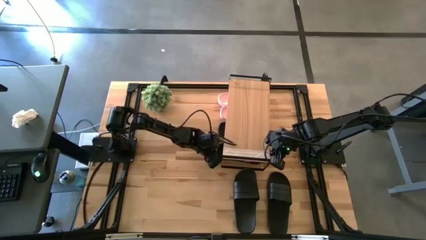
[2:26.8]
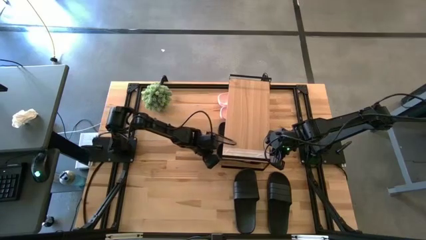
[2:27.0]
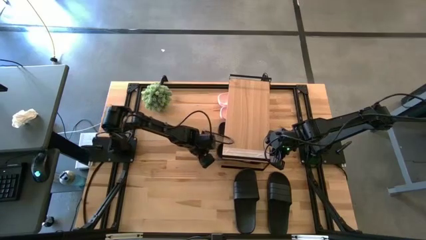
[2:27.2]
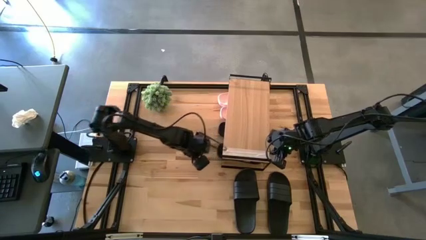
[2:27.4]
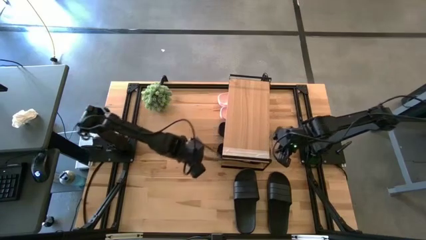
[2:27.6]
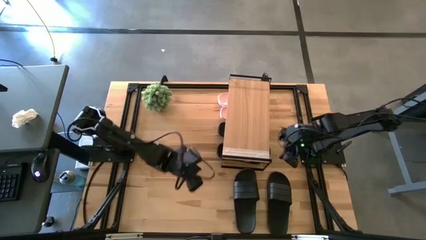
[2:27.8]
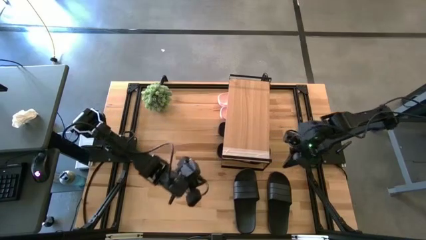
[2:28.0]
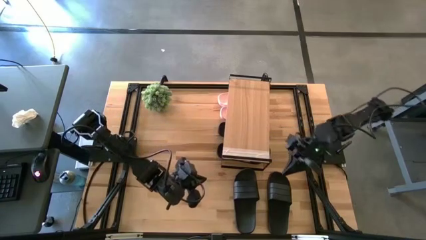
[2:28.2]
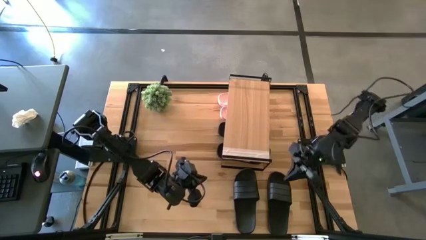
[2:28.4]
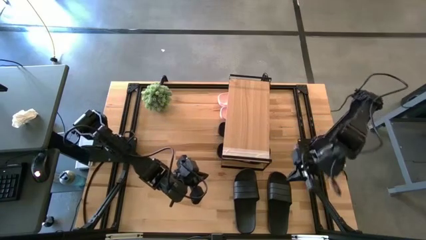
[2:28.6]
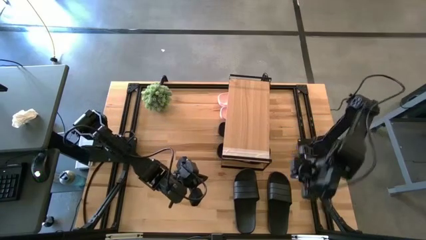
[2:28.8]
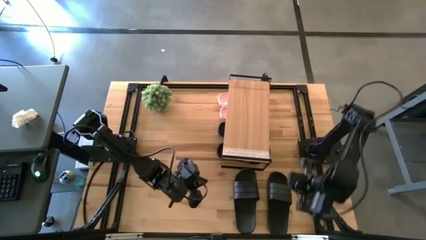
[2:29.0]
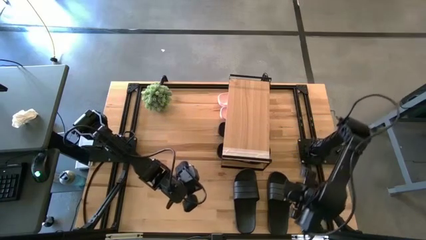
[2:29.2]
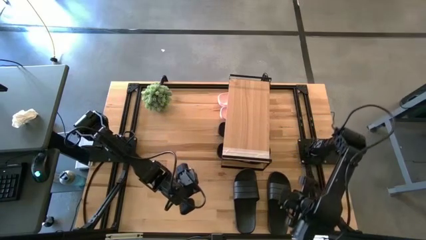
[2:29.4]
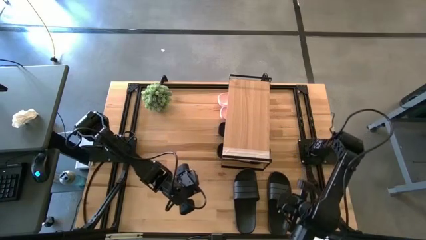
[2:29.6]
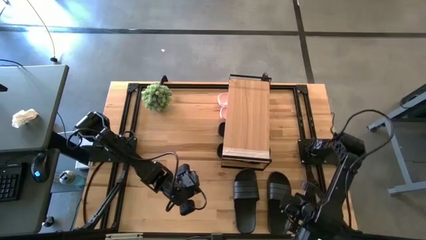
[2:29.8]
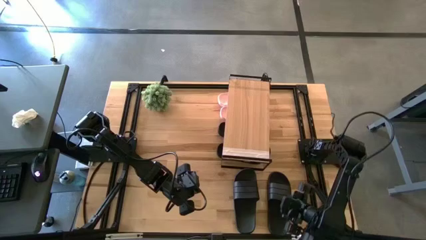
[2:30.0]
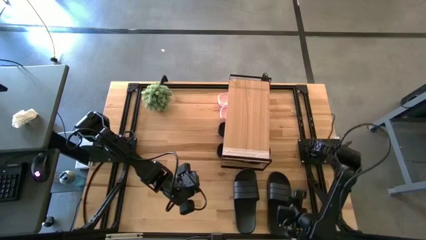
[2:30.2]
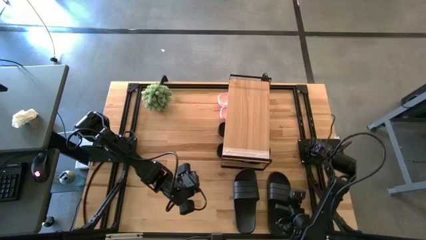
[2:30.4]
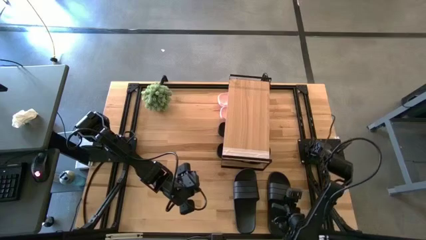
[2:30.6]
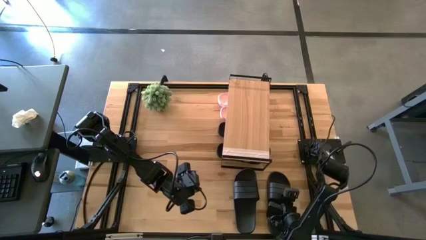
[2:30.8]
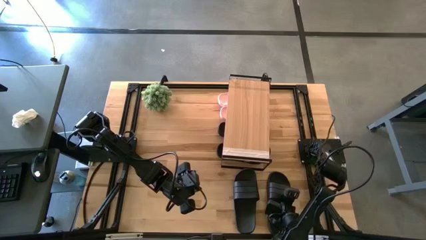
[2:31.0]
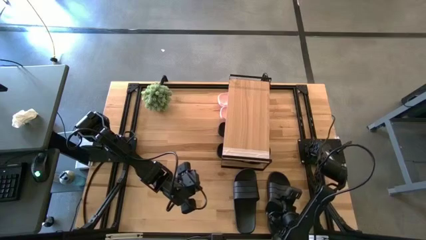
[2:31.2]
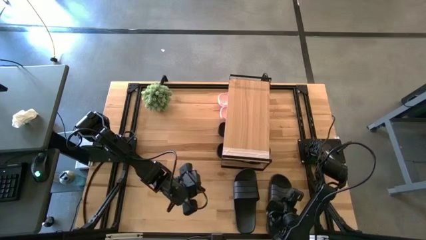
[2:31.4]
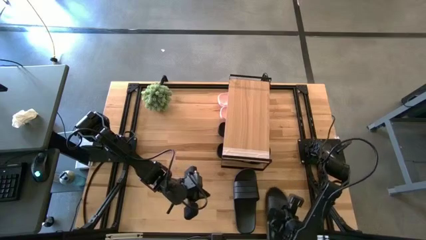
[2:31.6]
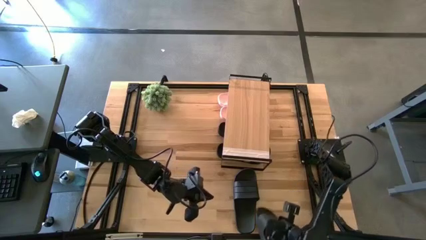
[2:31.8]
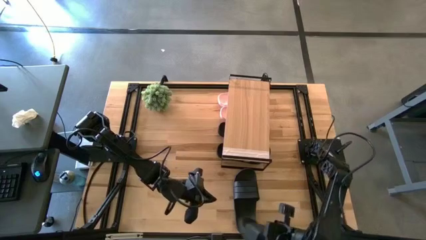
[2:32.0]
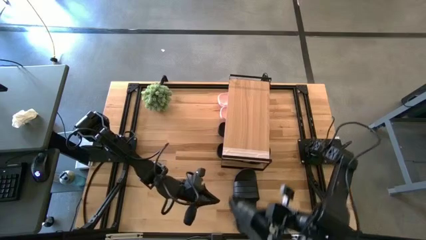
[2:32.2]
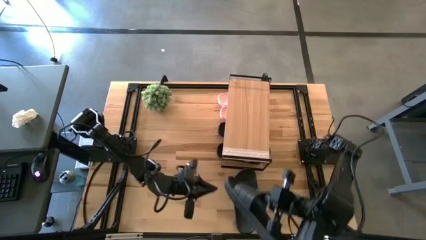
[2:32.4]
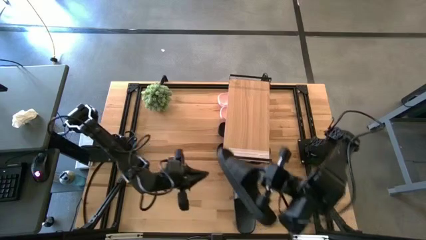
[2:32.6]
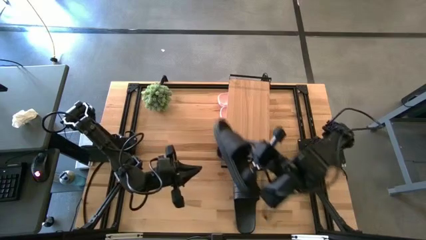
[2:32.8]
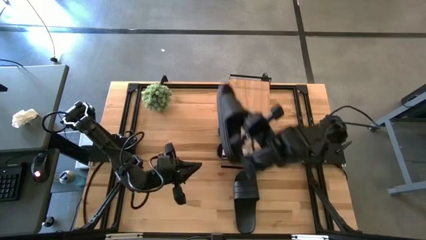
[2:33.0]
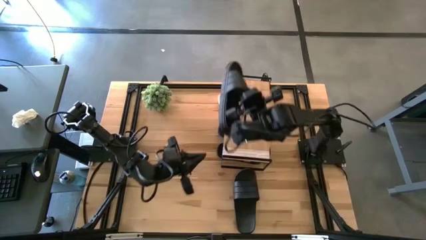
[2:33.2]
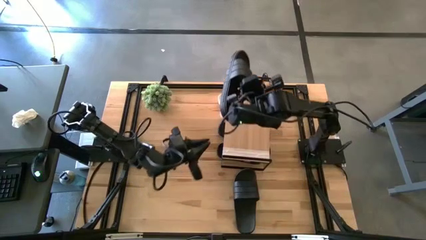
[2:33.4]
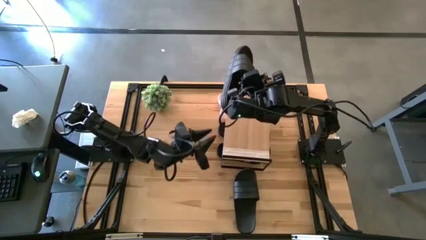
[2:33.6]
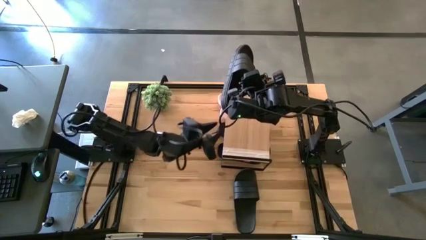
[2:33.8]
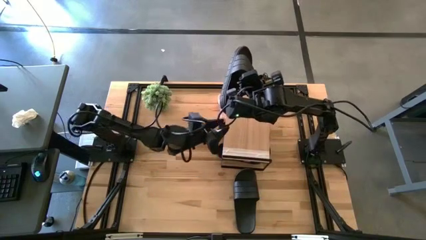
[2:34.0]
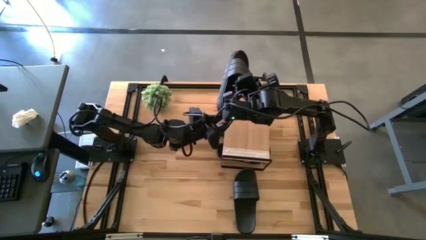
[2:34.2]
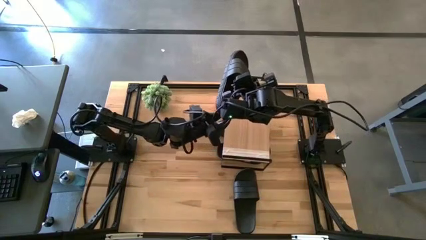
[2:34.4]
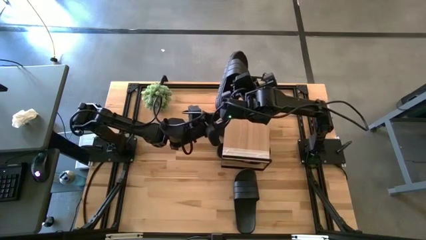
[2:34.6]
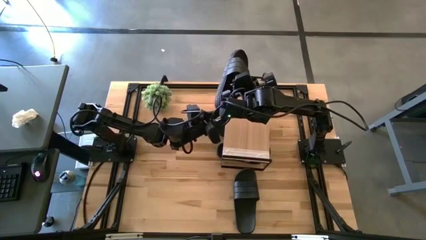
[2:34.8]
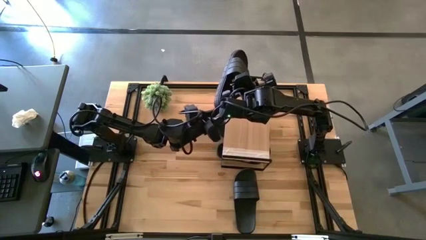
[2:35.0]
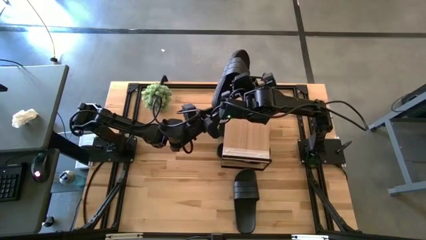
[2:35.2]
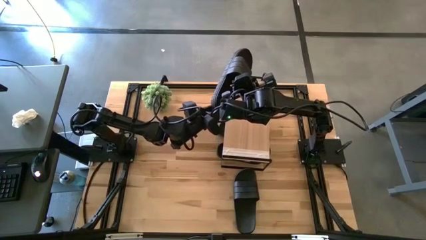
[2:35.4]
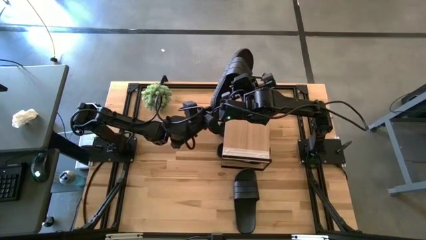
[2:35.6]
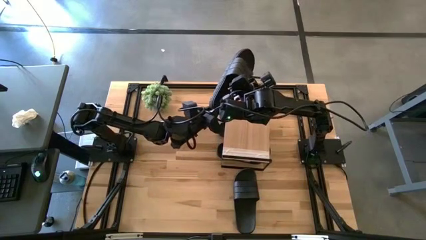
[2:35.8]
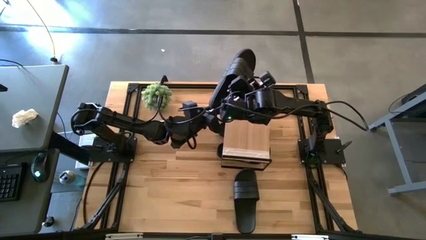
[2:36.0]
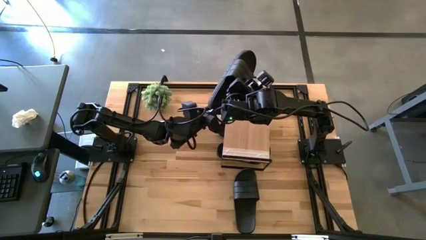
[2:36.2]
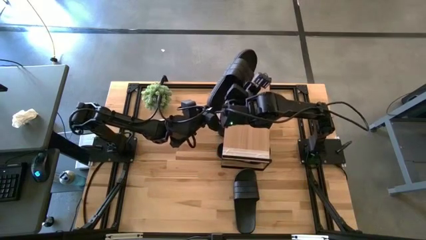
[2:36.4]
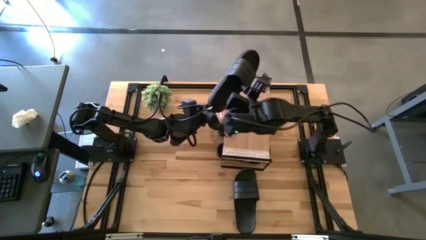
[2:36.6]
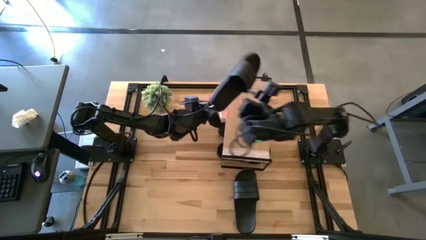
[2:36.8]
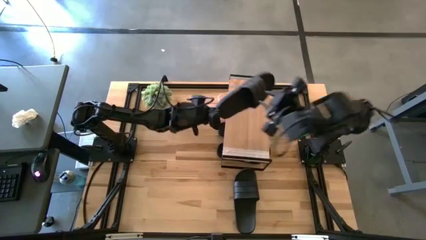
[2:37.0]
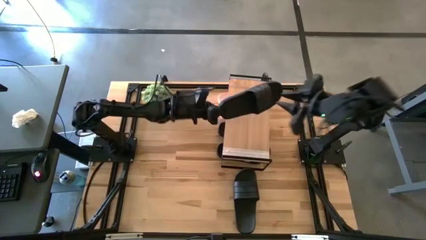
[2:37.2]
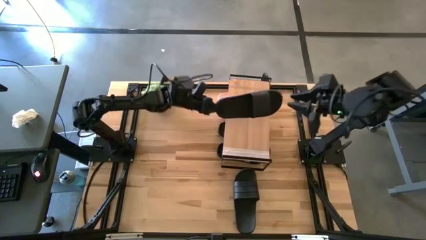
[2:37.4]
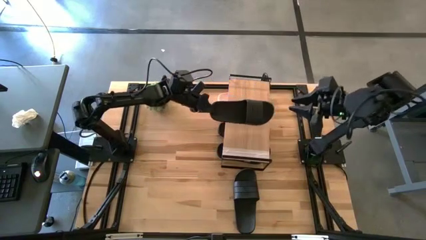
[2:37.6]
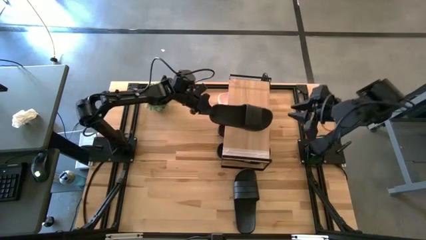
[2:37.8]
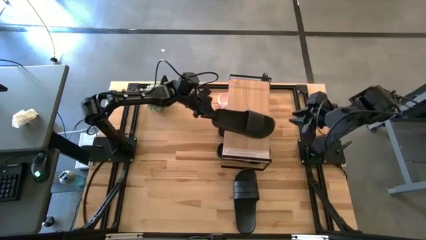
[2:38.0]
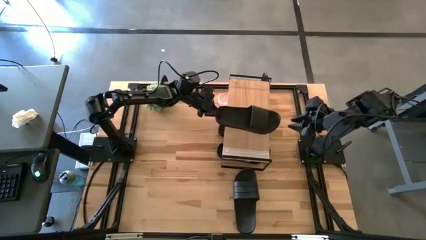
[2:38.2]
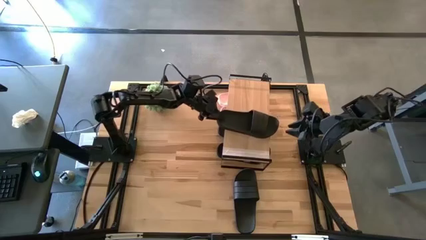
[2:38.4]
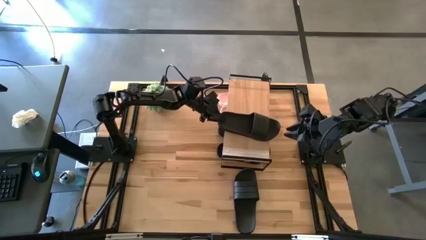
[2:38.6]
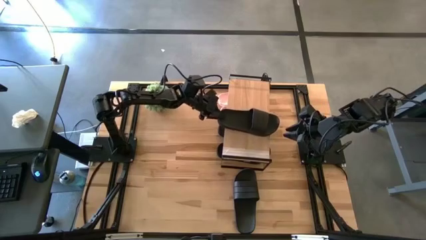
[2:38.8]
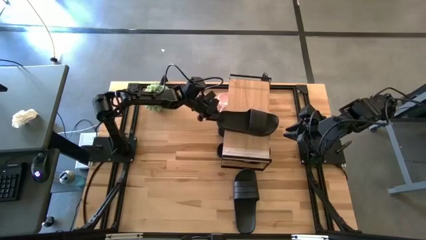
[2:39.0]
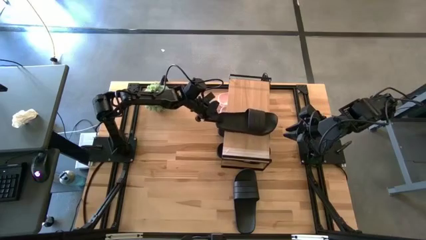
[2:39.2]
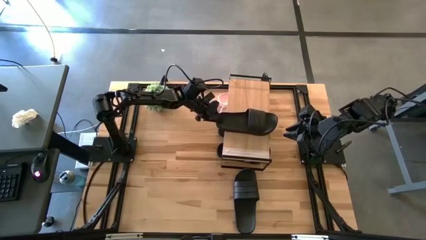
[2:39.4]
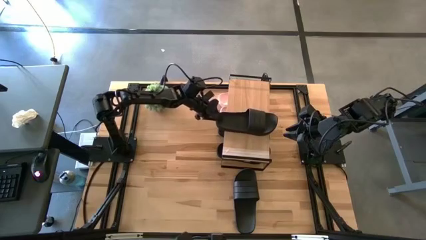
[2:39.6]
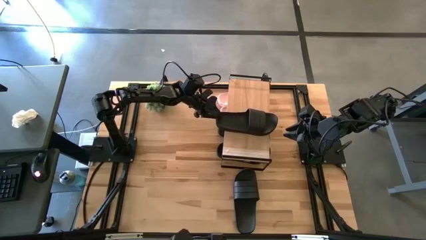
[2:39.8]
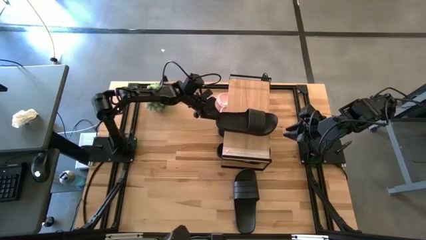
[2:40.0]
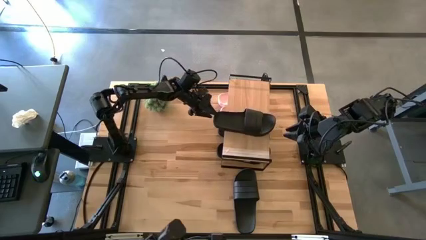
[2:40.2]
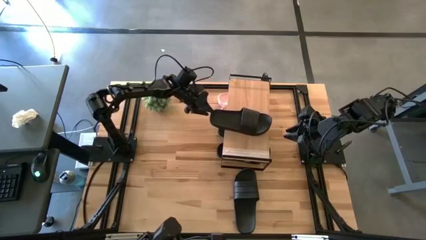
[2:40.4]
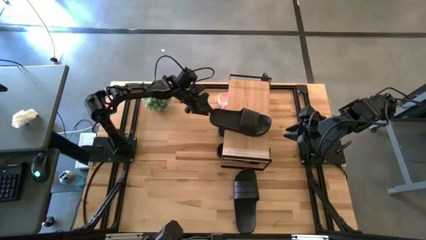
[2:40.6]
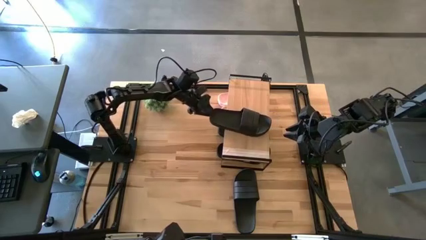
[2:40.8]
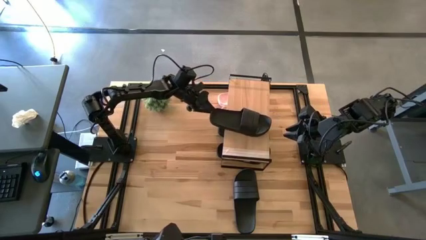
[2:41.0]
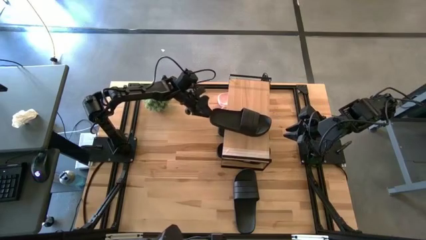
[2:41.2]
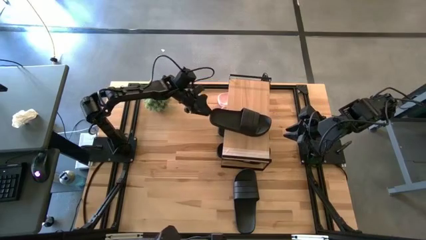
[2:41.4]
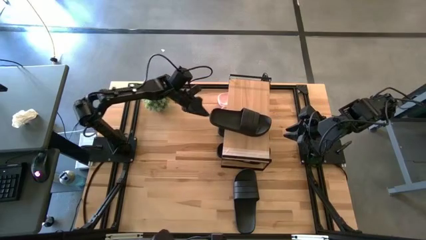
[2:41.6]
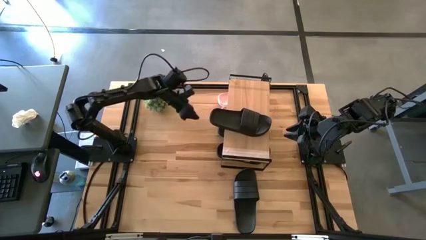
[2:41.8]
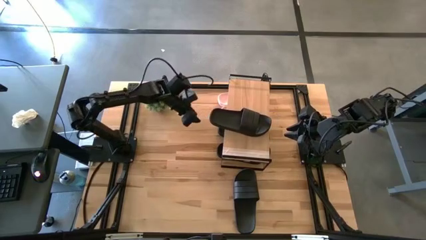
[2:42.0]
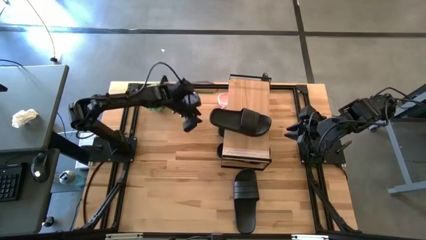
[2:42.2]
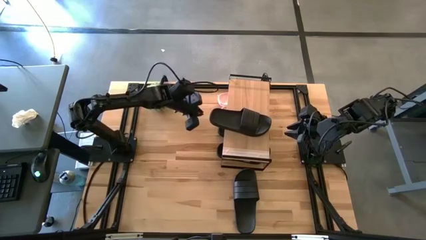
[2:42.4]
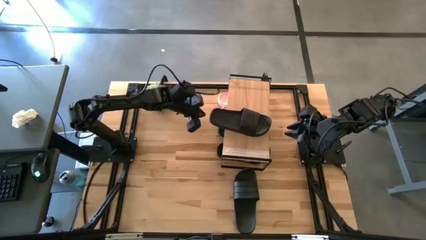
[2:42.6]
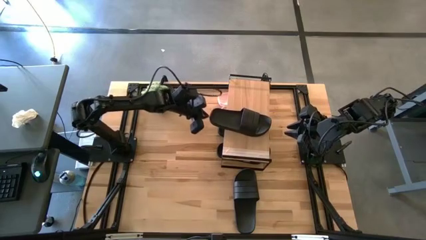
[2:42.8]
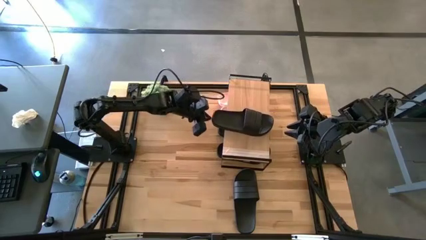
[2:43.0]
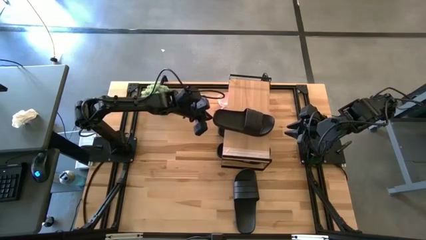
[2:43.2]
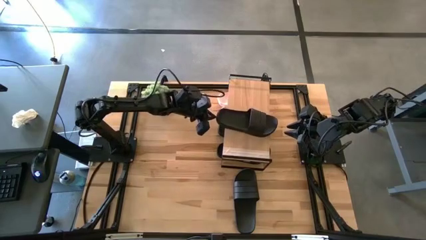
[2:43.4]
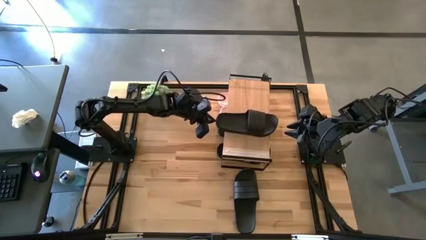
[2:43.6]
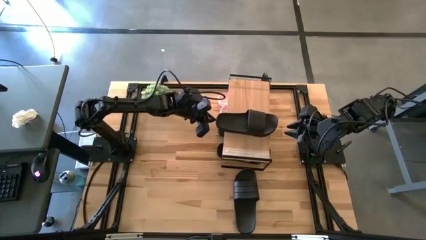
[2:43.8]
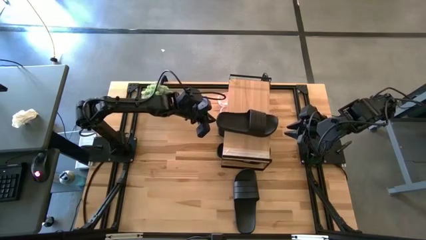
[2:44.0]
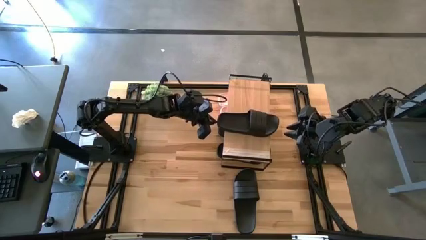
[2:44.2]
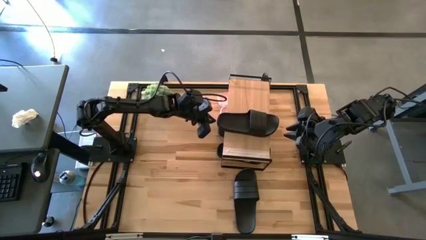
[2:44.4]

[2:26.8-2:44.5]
Task: Pick and place slides into the shelf
Put the black slipper on the shelf
